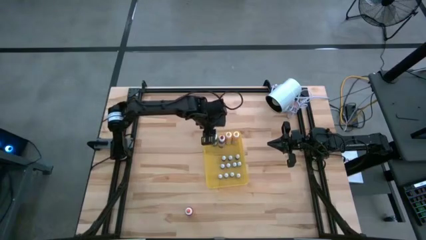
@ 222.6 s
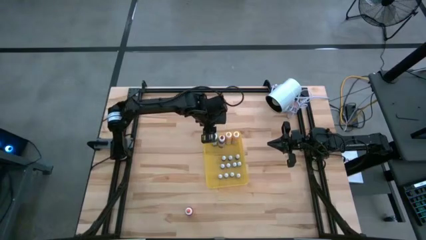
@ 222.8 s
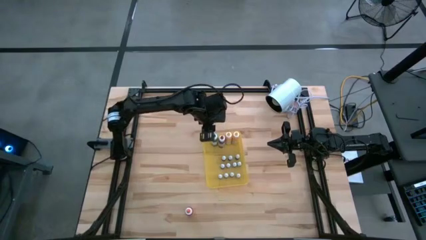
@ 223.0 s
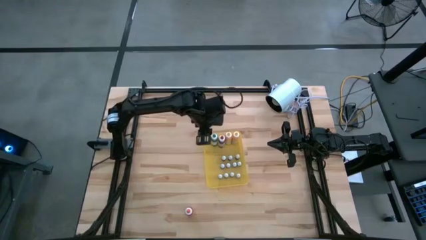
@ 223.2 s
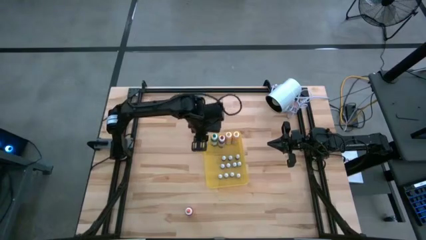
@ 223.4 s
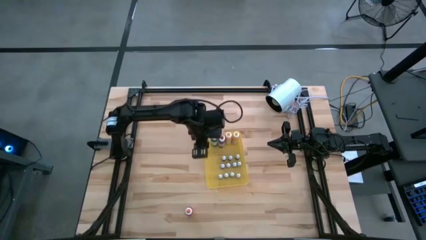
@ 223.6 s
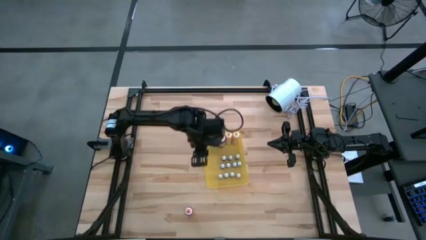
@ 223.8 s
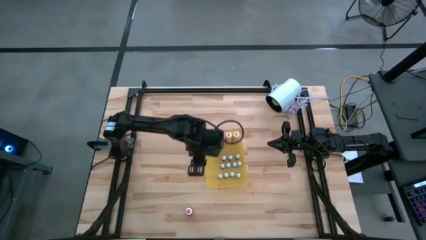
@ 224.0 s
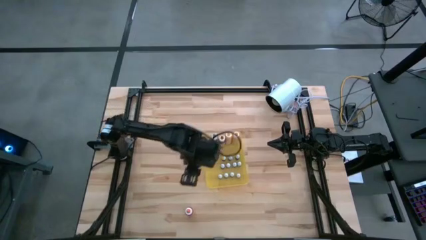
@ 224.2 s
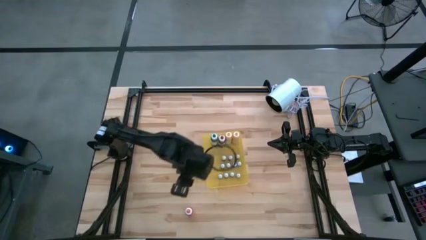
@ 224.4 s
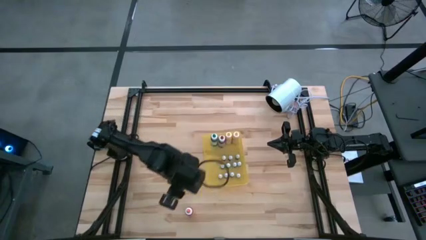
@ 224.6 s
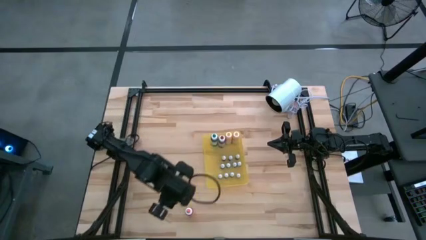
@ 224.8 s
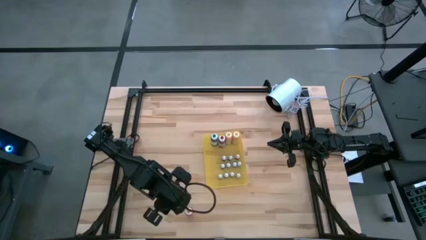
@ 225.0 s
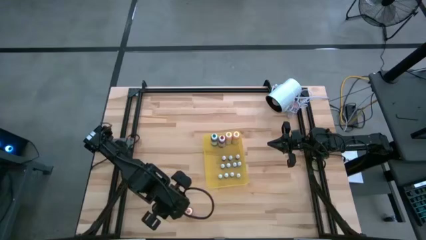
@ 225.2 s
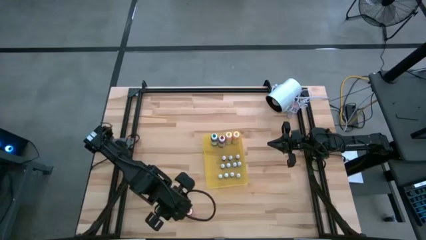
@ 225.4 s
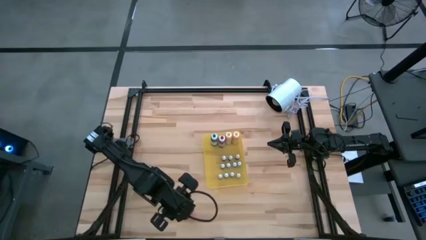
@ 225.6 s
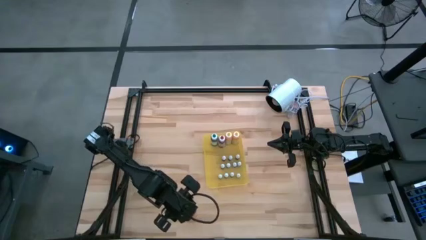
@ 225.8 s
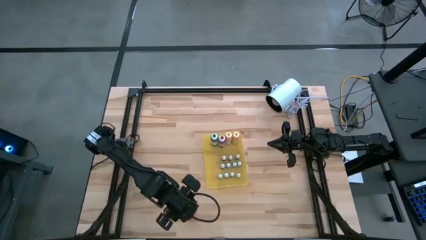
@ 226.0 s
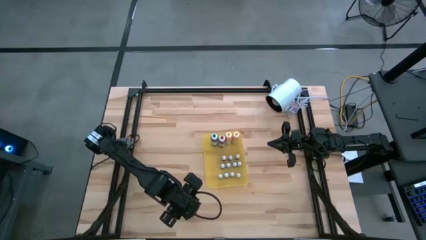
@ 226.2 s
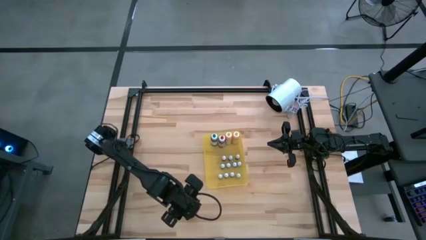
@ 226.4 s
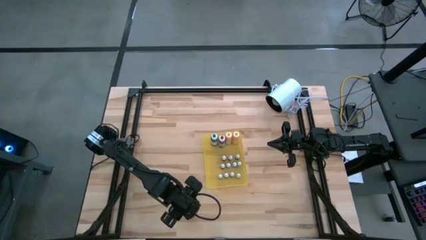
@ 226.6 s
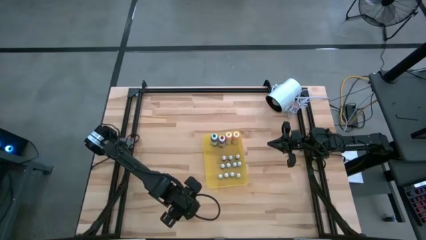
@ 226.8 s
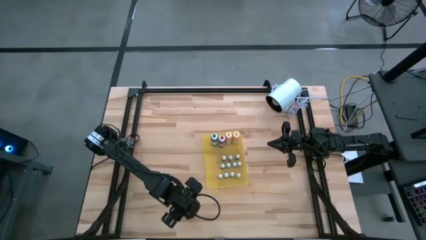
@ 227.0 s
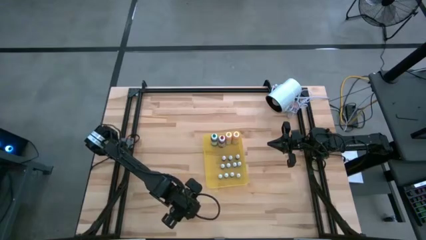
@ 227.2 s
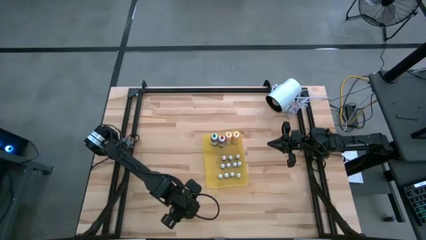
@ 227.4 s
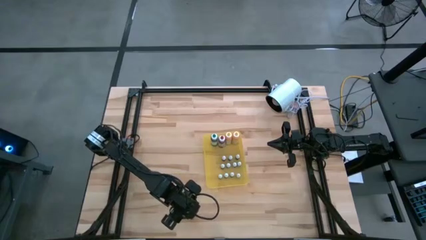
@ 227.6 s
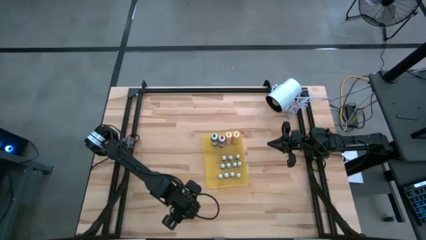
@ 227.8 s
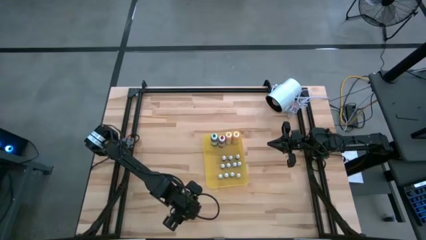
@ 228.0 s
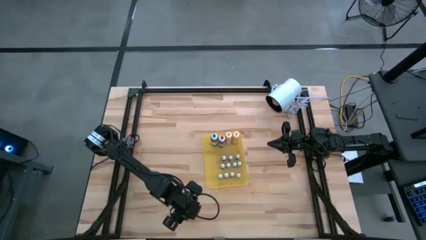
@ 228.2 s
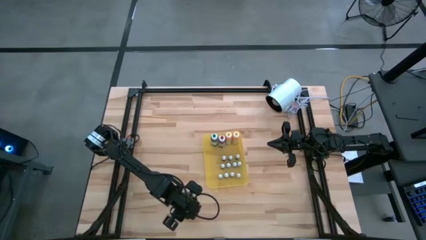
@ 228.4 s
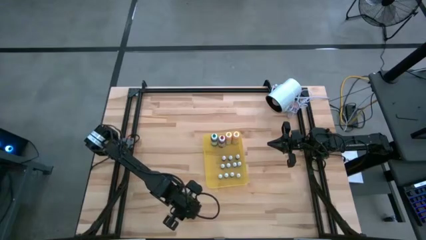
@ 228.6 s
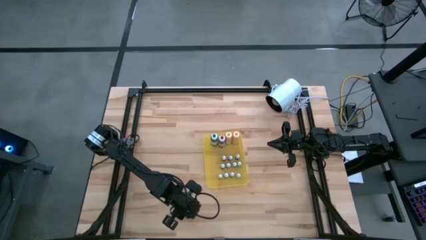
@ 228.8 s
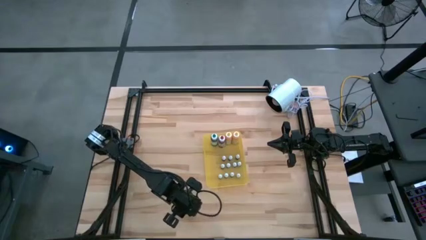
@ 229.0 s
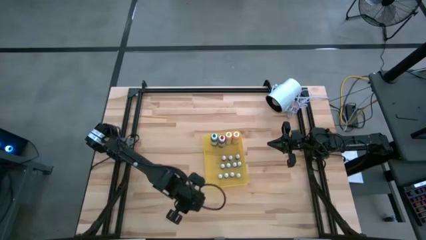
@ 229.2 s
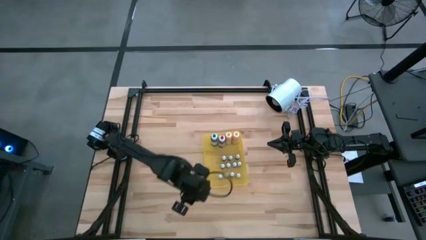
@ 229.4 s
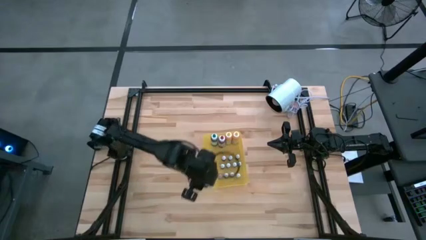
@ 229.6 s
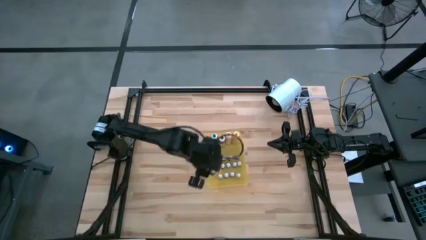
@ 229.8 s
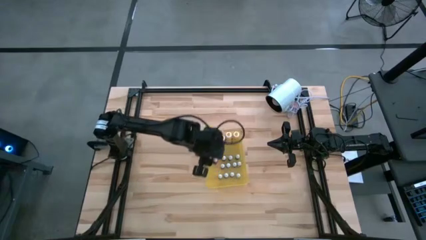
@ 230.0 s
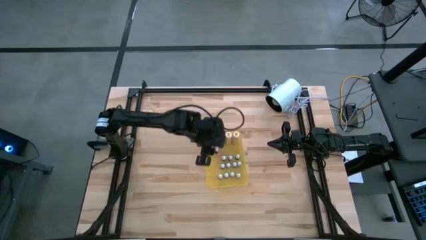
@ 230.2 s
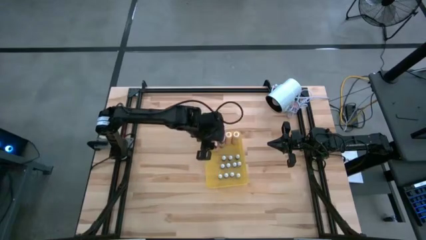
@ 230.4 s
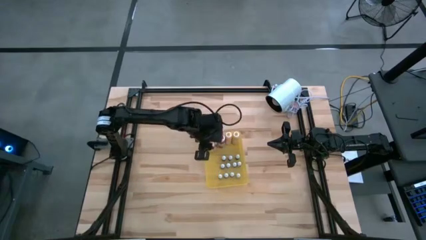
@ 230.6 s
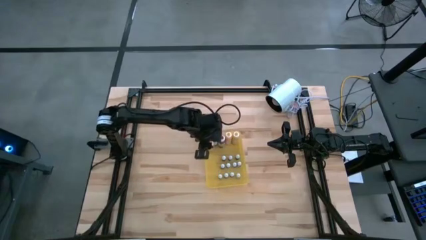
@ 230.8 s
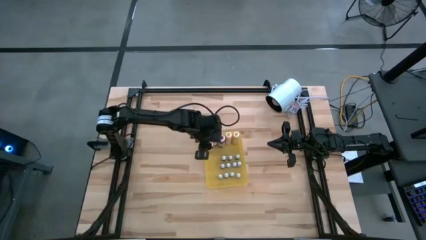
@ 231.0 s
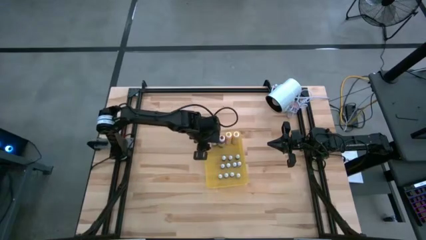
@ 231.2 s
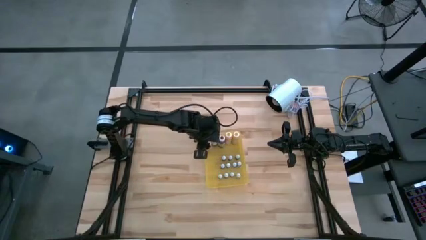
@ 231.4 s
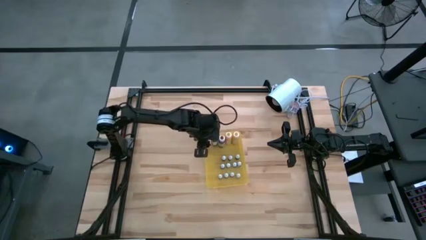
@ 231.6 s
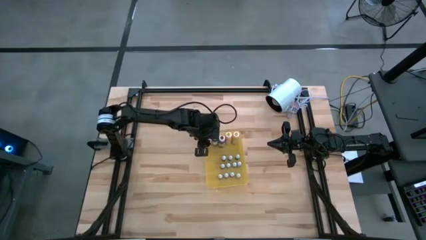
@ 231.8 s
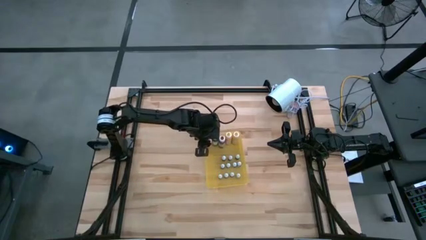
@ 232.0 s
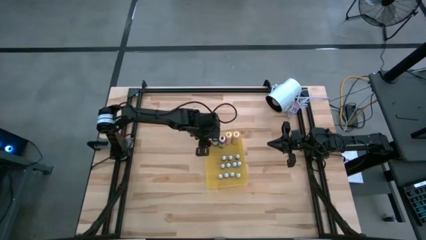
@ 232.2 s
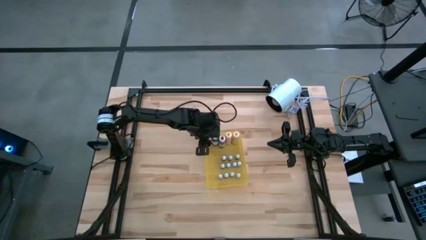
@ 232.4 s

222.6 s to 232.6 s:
Task: Pick & Place food coloring
Put the large orange food coloring bottle into the yellow bin

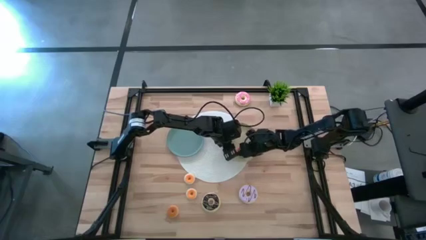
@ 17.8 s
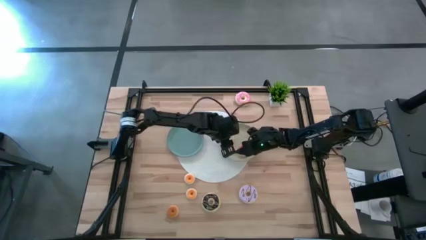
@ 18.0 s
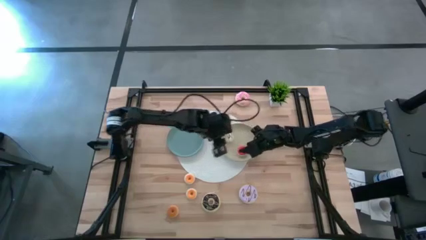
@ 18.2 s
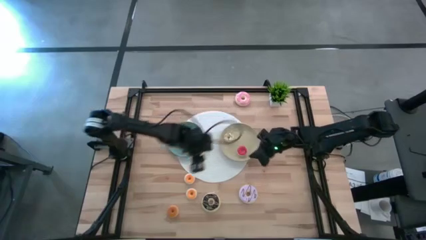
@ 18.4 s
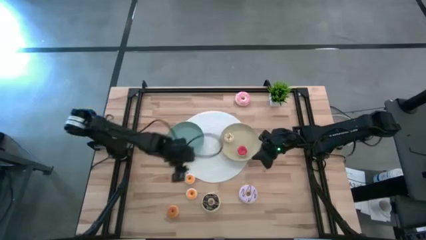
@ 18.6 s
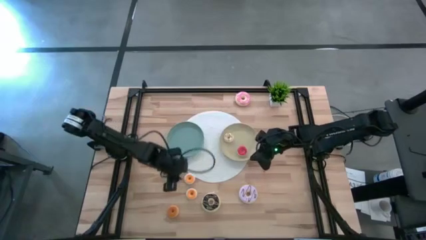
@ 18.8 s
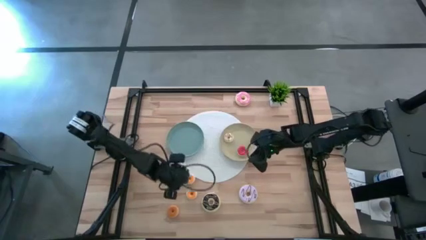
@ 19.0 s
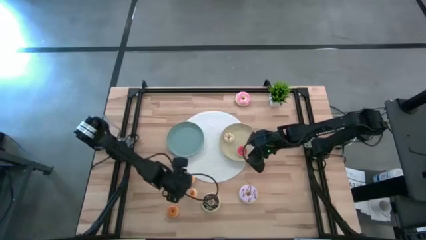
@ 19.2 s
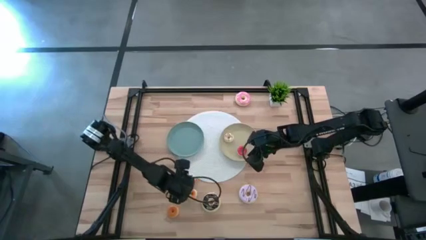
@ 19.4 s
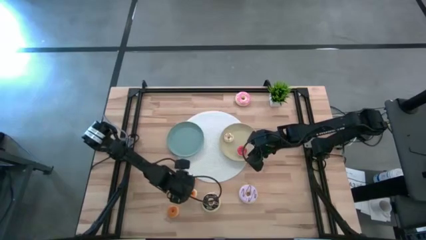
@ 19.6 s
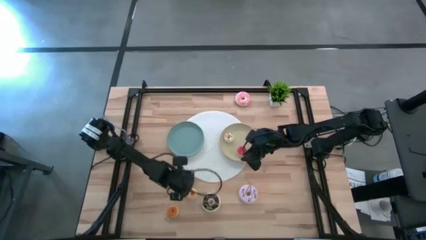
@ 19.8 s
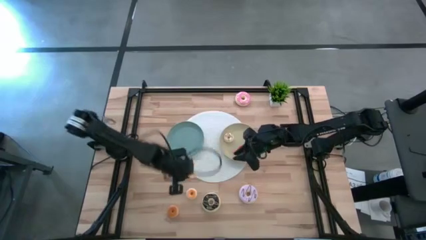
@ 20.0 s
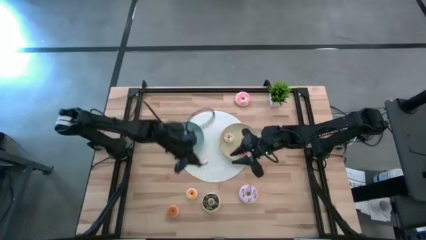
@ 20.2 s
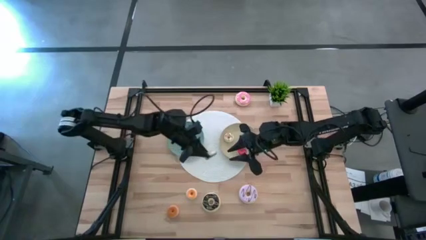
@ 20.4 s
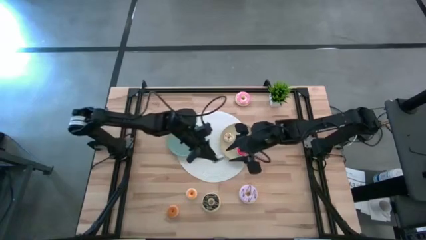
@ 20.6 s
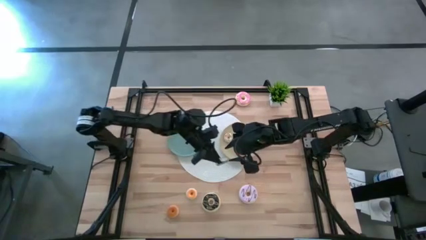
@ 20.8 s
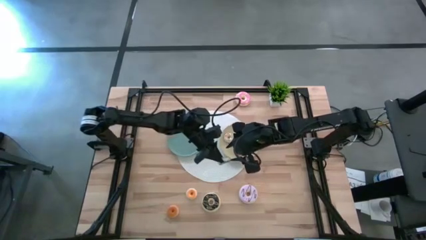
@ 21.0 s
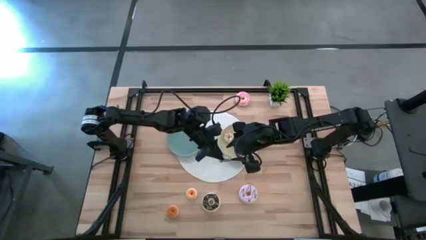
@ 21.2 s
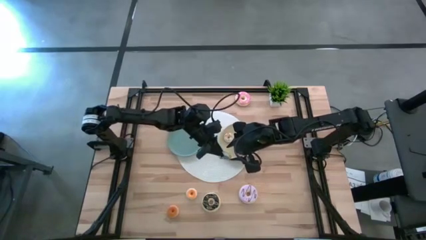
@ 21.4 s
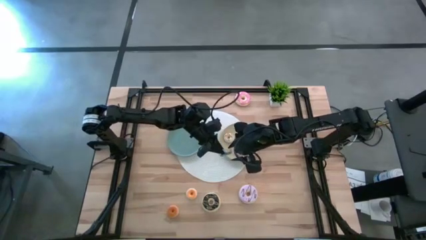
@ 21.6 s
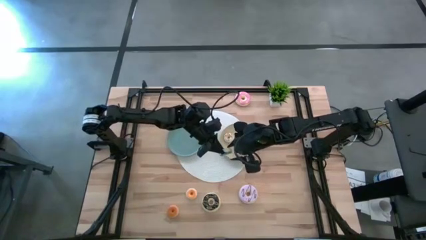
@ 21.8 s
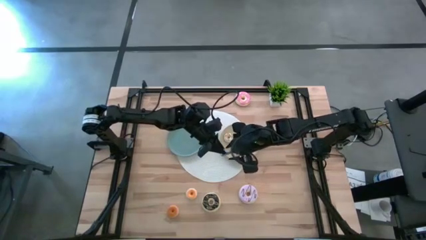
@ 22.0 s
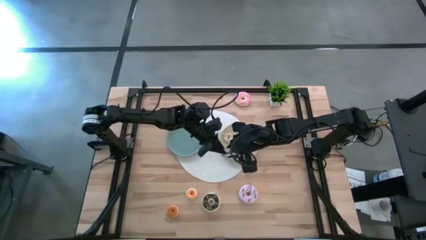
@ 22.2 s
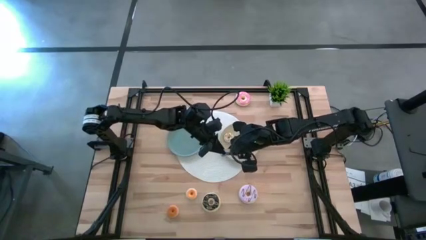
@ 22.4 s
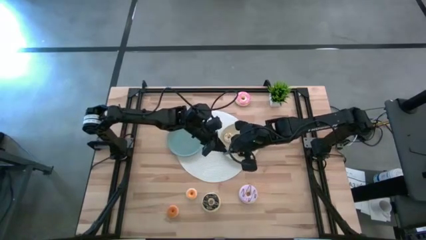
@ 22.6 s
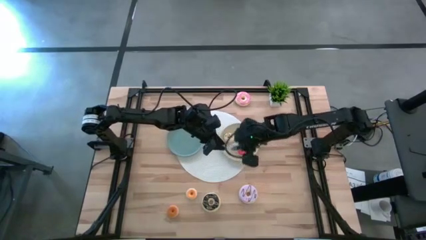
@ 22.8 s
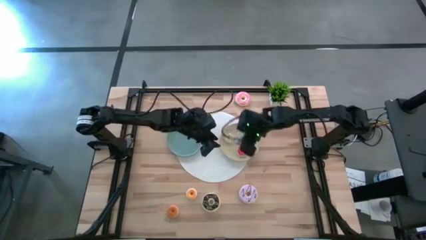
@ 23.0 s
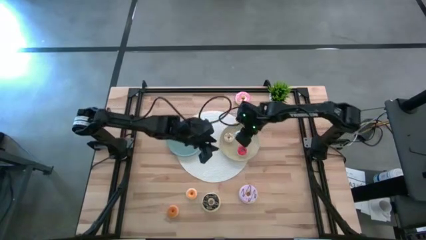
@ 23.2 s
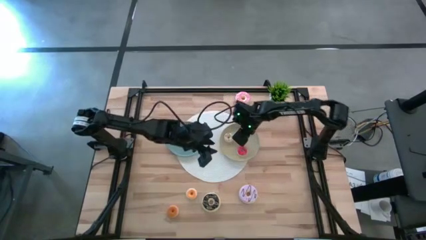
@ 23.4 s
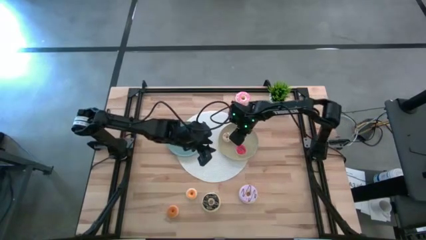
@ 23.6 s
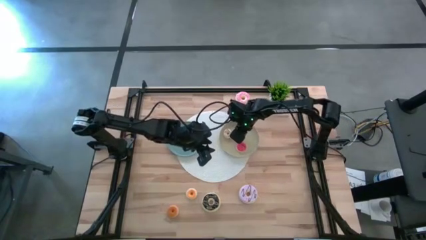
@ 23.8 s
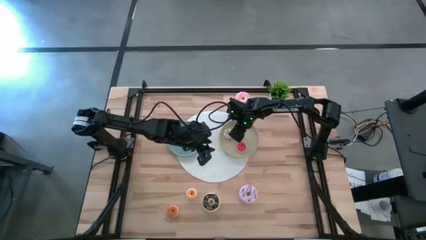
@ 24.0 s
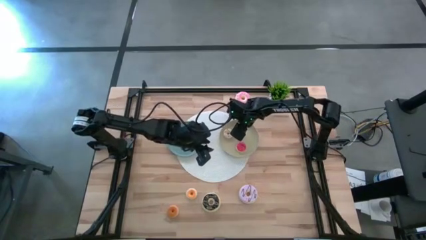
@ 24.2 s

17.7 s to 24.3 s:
Task: Pick & Place donuts
Put the top small yellow donut on the brown plate
